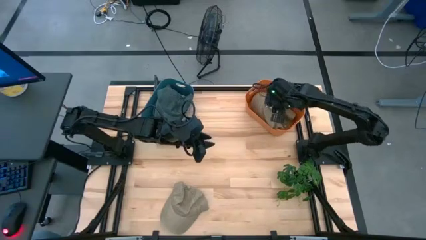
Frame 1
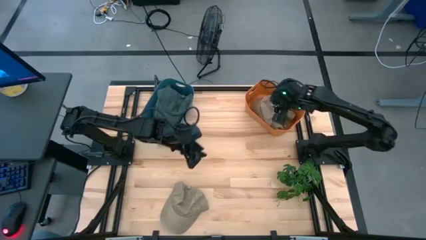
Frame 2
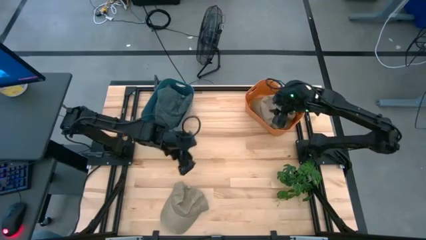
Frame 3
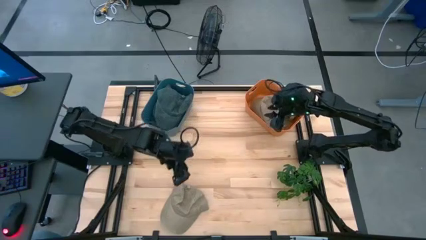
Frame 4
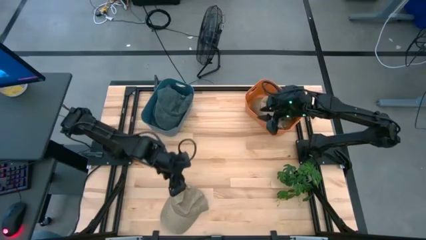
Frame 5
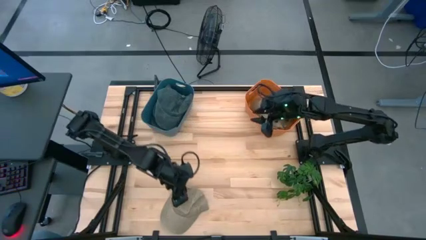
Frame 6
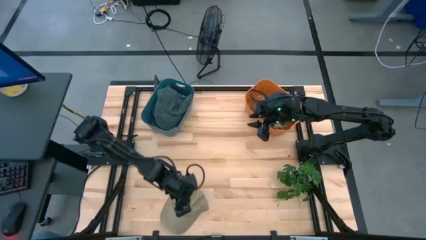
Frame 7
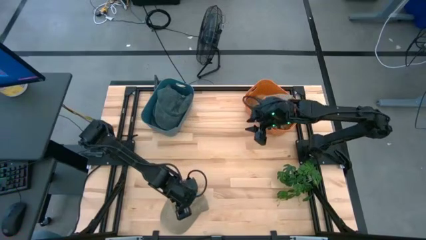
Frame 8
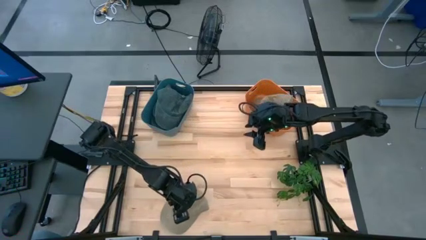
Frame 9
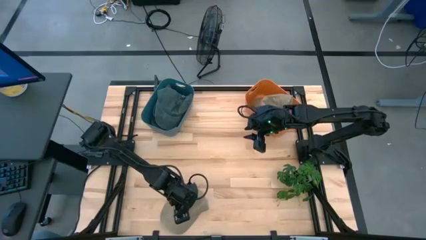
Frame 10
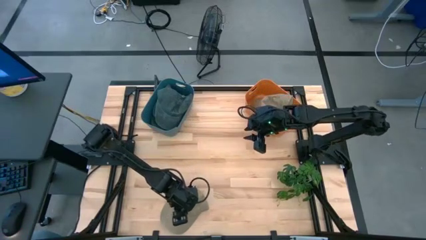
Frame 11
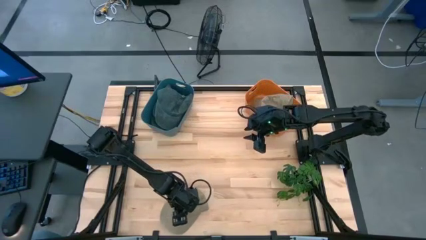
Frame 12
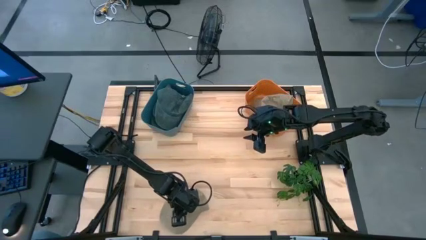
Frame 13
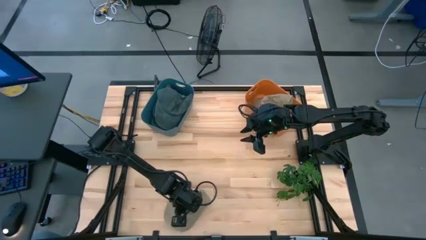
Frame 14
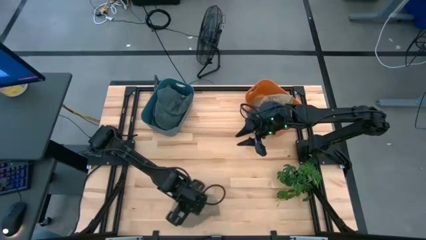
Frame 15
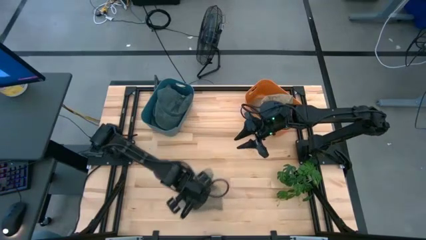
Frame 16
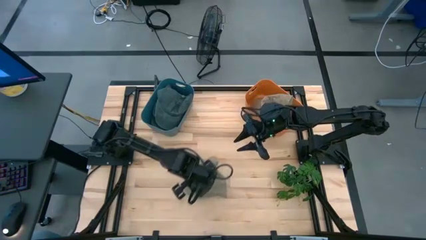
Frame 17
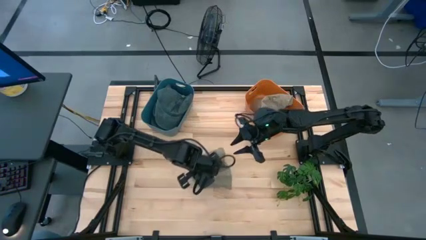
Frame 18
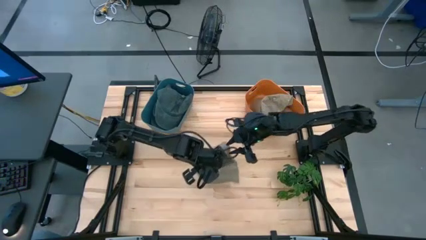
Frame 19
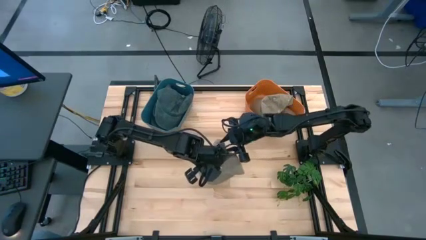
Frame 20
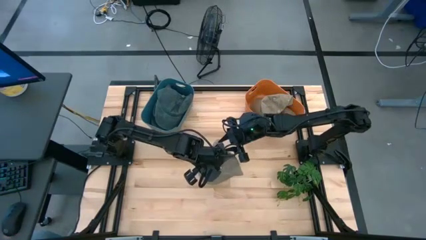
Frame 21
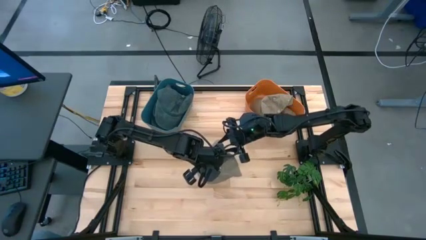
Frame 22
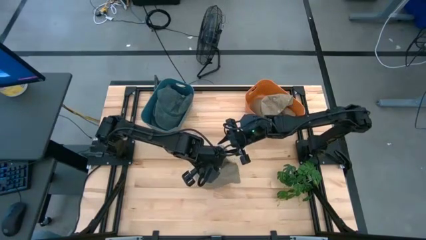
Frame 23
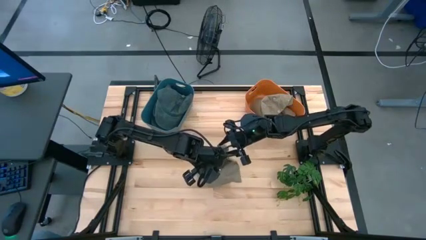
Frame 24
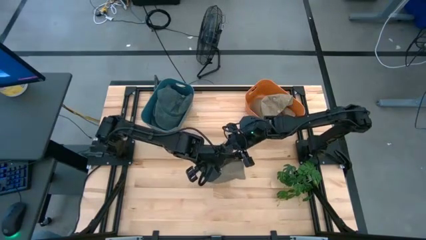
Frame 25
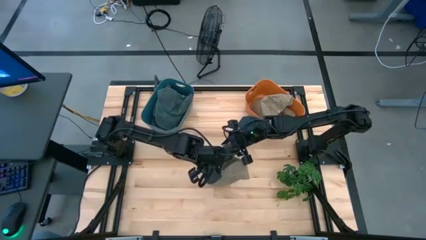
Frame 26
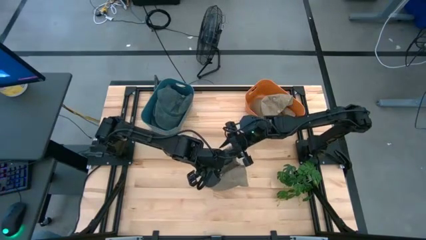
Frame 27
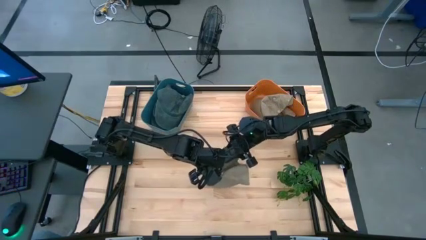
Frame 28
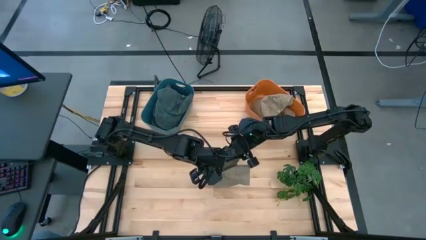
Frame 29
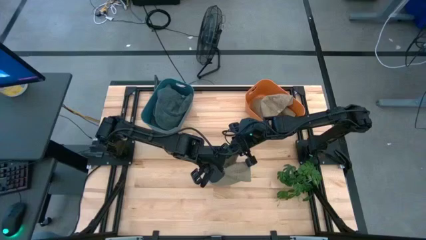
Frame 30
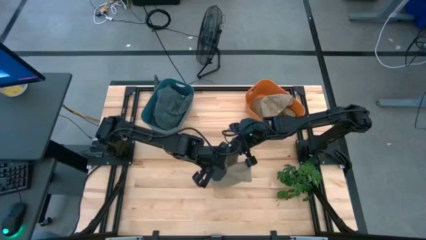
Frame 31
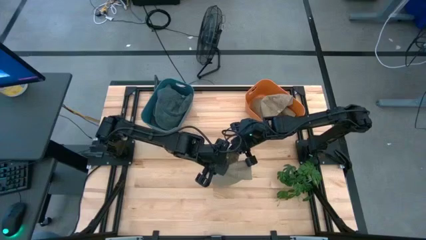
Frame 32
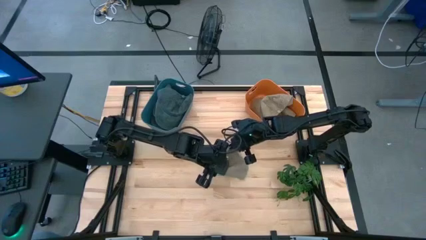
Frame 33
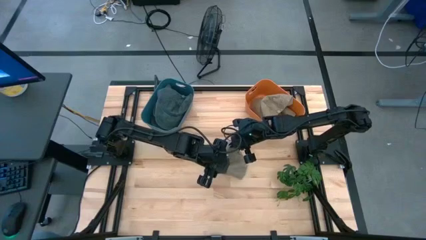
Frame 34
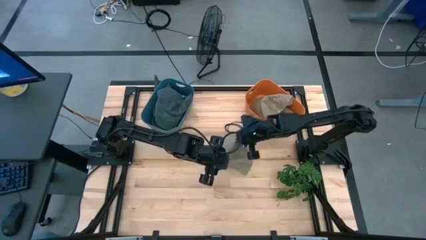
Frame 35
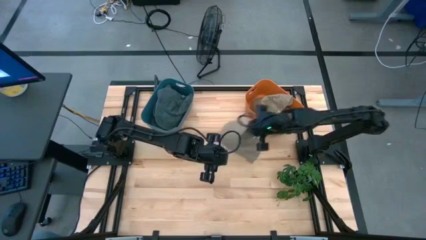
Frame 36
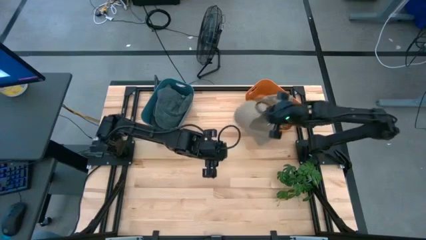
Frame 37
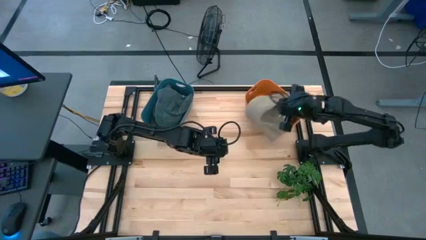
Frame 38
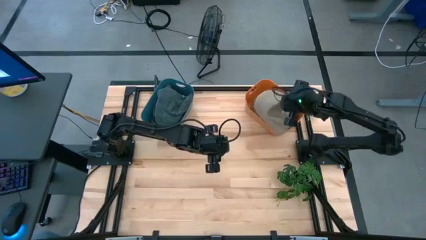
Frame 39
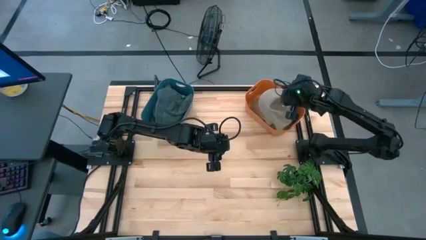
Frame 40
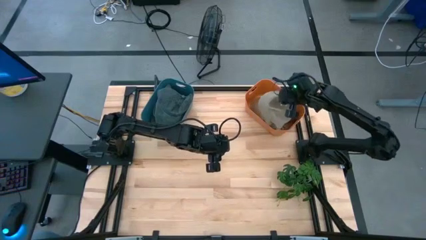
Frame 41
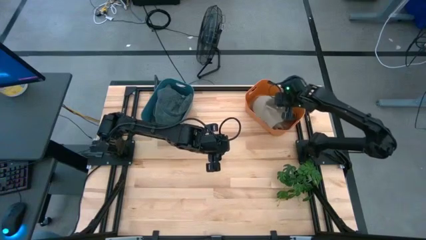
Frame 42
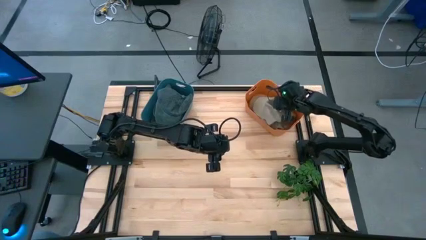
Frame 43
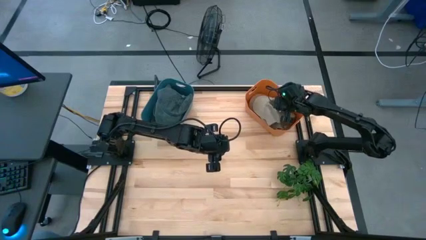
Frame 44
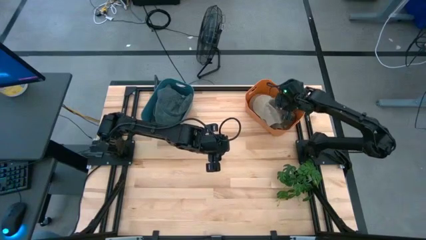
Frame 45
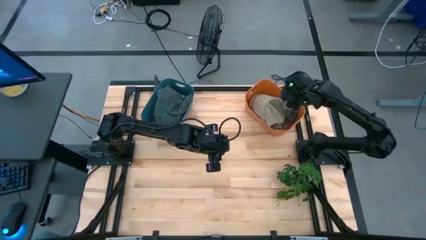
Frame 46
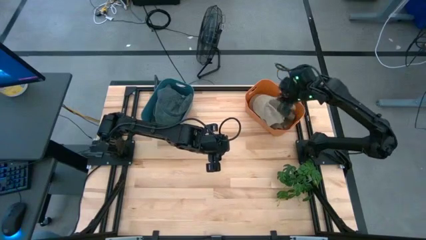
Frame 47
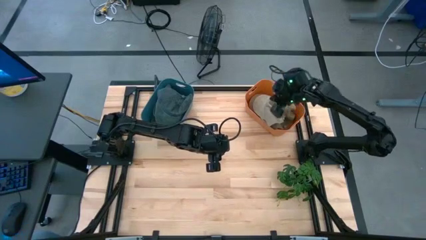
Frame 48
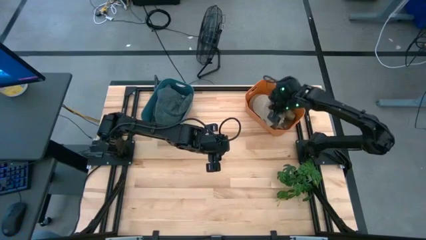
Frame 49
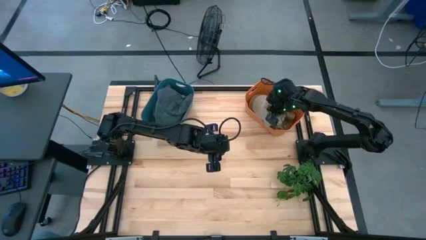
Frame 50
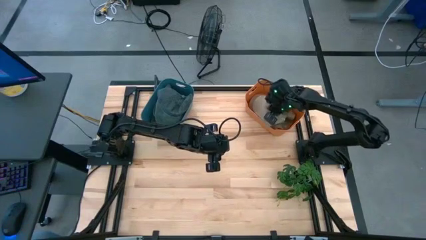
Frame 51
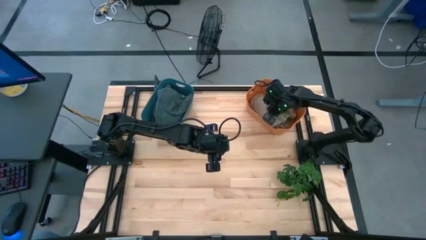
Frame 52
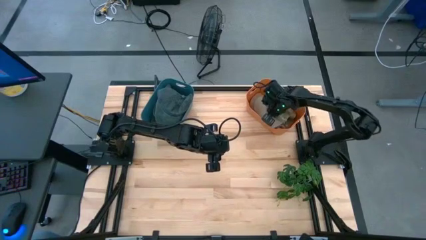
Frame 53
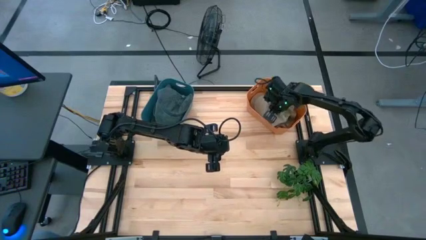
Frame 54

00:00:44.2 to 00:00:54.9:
Task: Pick & Place hat
Put the brown cap into the orange bin

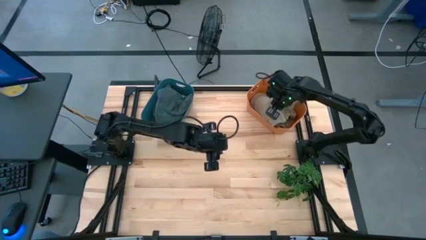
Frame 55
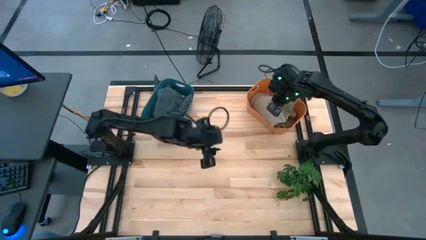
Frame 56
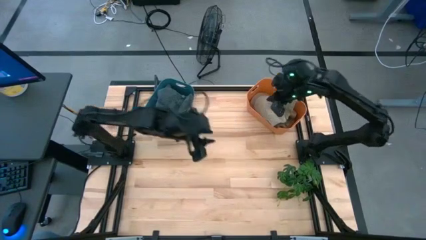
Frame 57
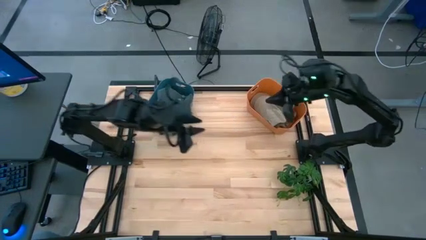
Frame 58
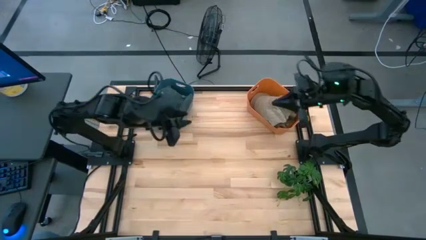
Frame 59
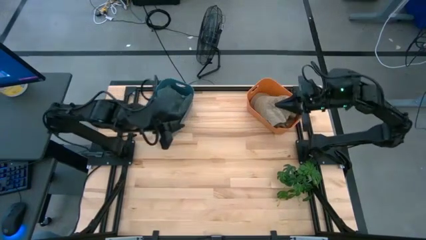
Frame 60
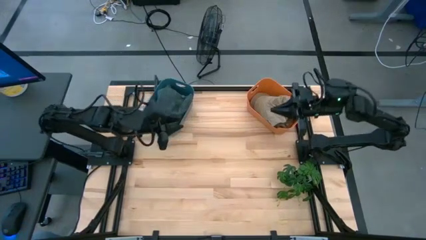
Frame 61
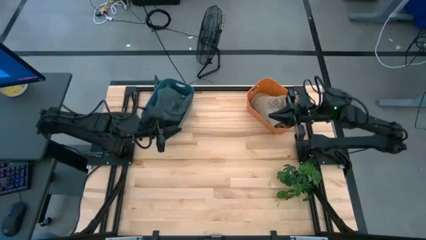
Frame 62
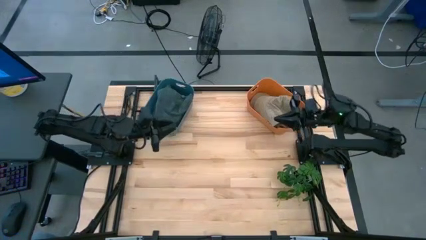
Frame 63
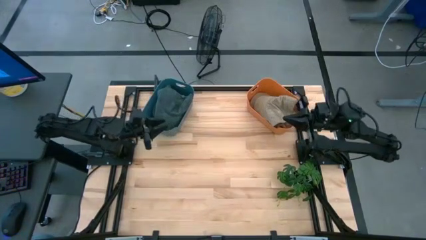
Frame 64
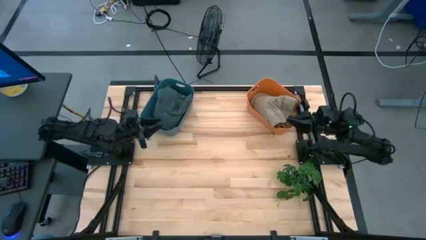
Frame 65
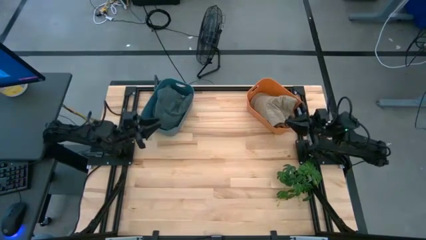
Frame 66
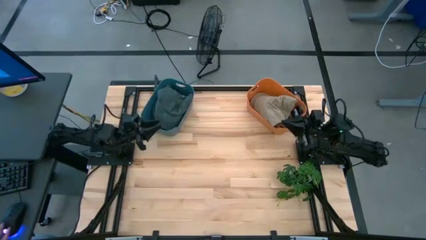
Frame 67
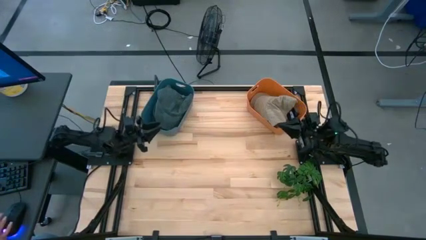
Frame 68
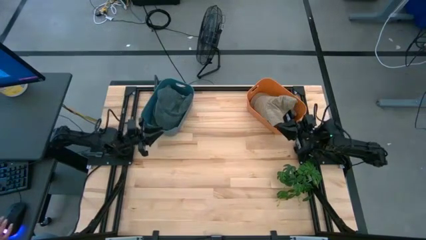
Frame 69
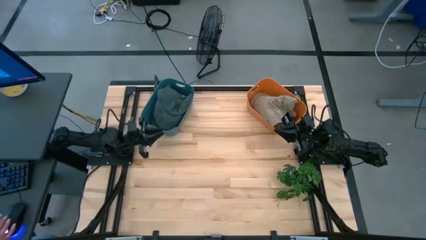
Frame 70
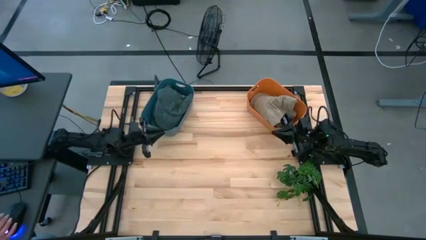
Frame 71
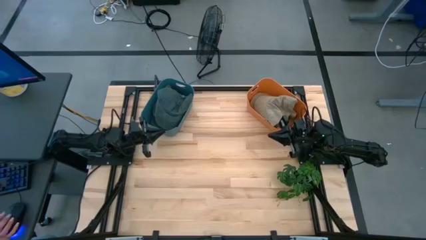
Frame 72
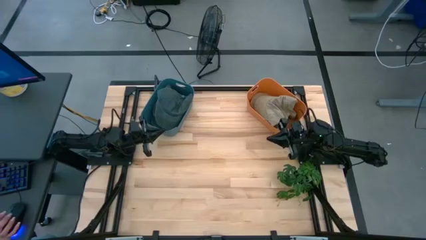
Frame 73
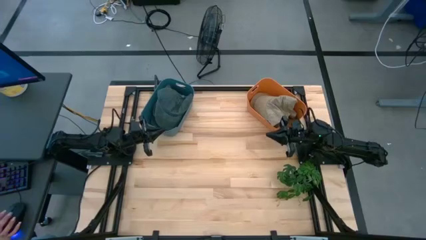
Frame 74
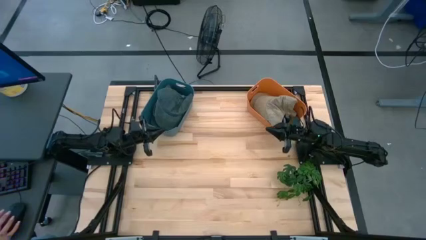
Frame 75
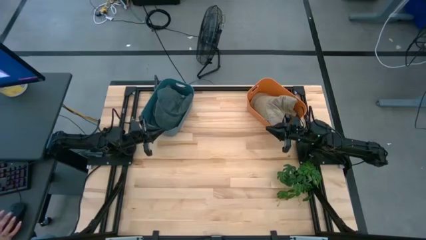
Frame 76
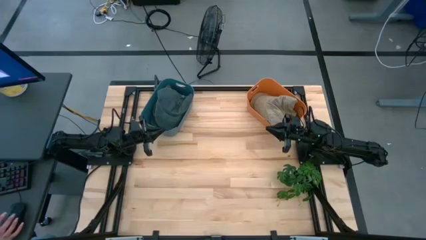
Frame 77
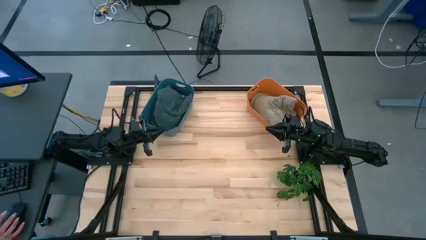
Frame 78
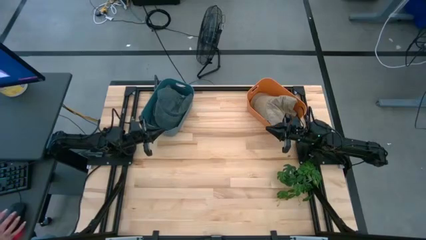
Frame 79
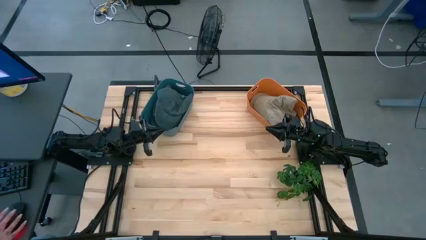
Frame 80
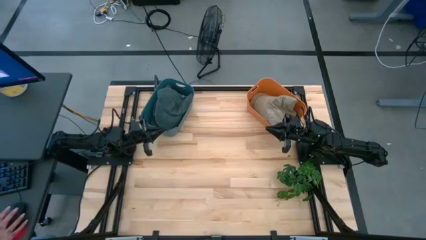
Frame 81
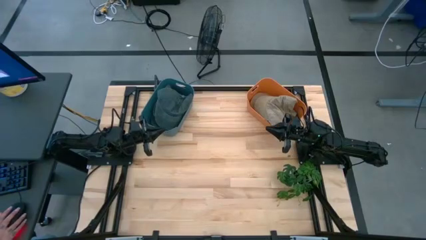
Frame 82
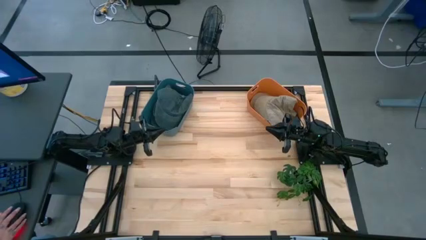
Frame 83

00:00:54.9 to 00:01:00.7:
Return to Home Position
